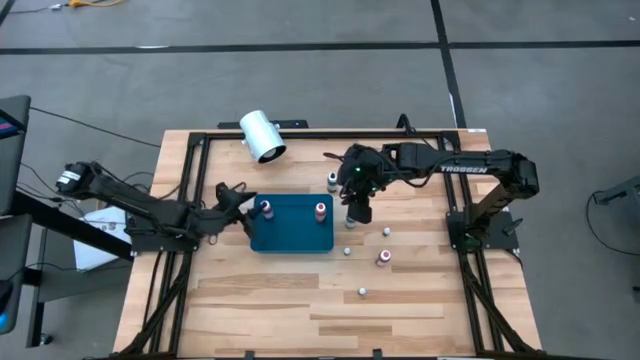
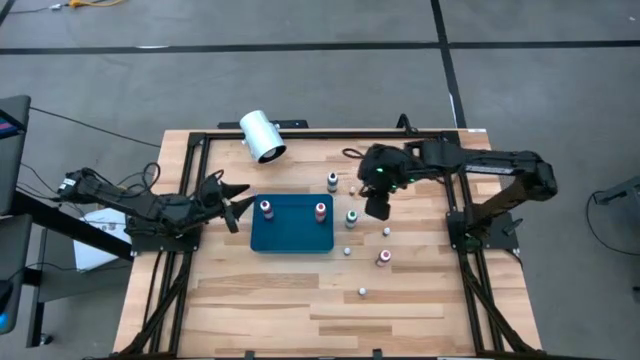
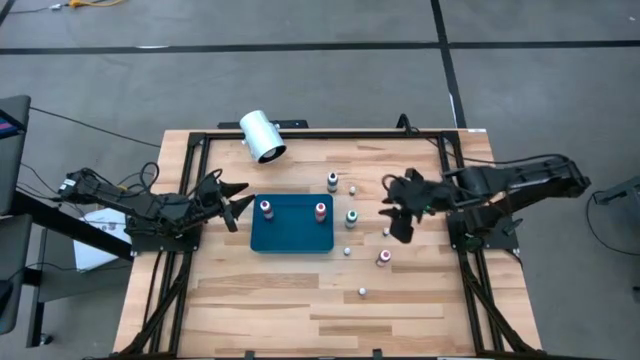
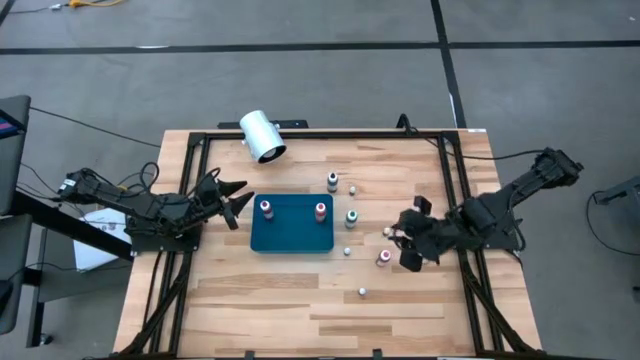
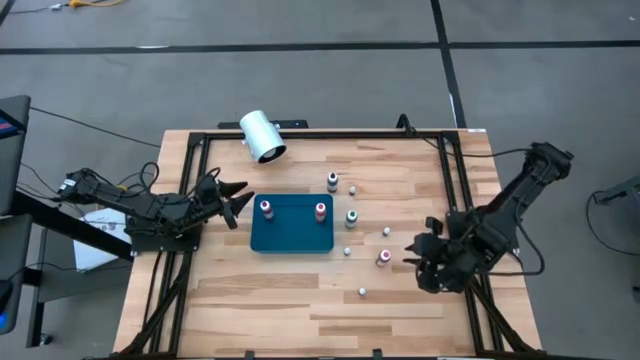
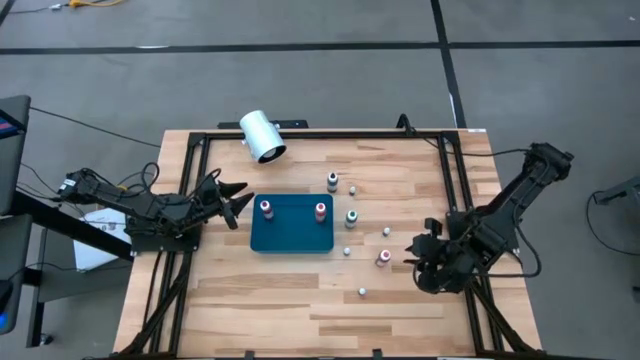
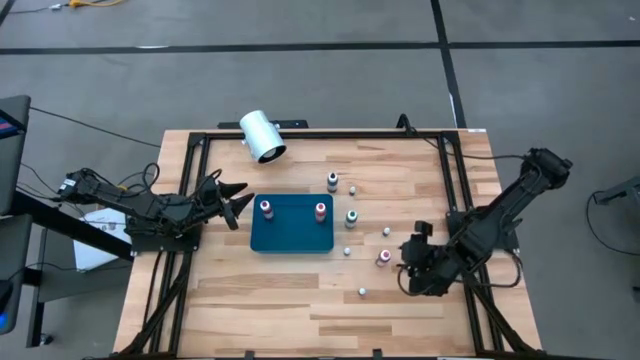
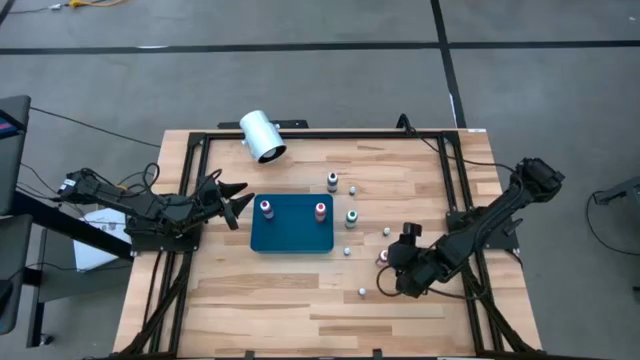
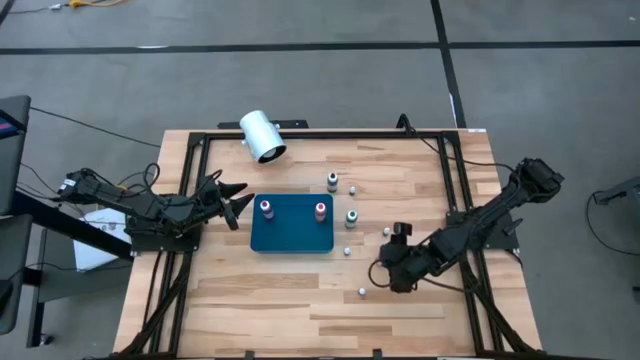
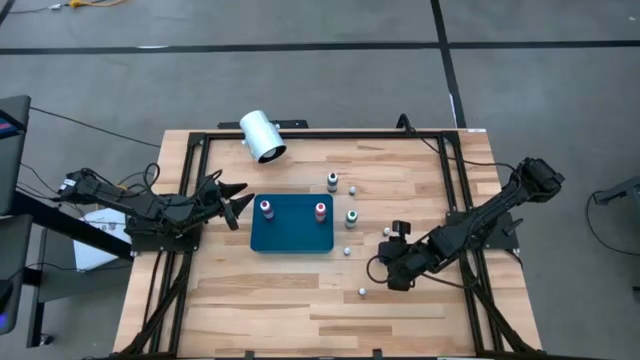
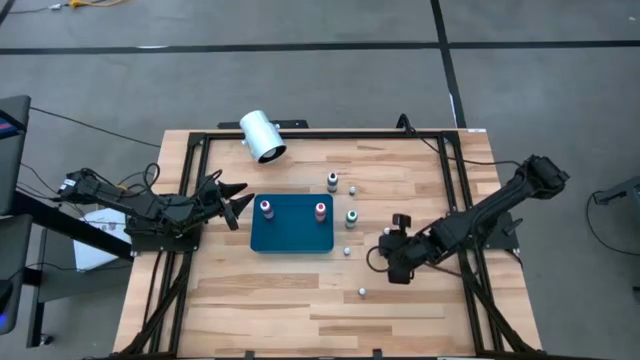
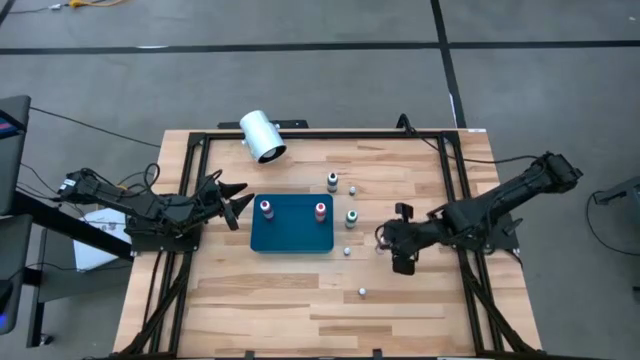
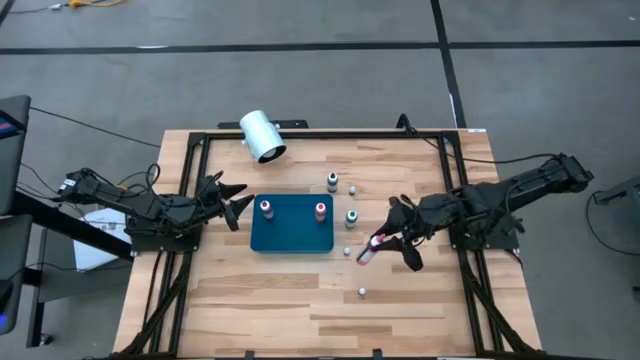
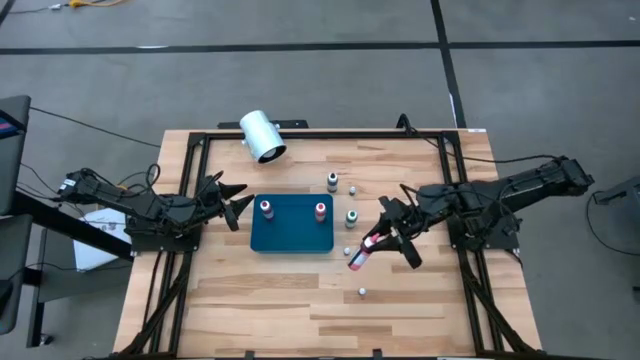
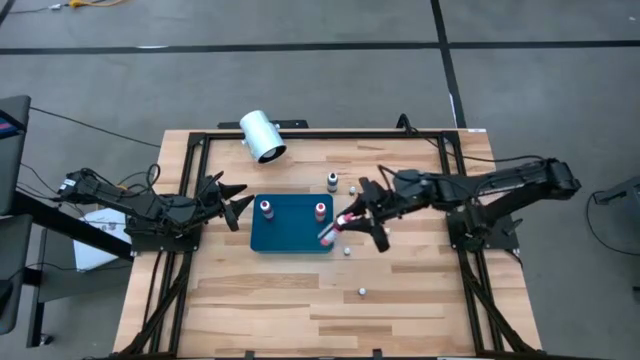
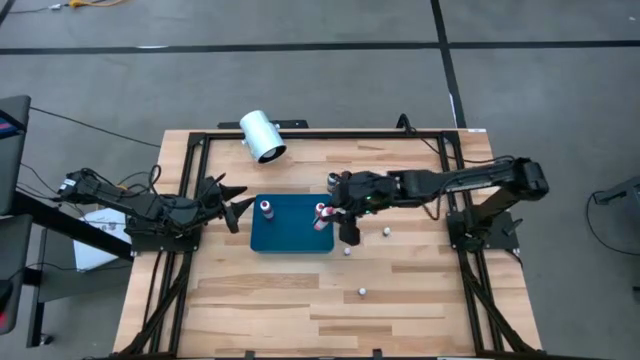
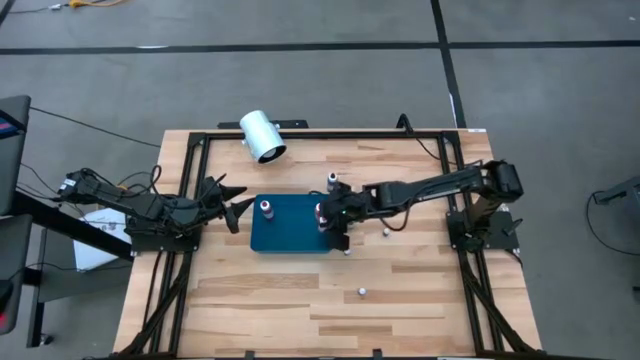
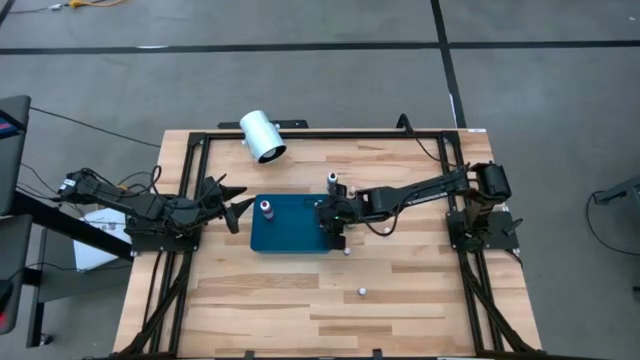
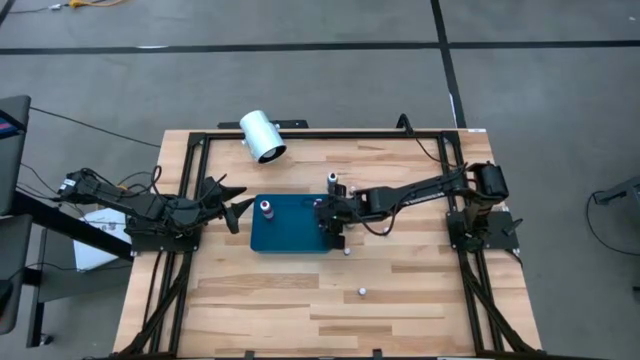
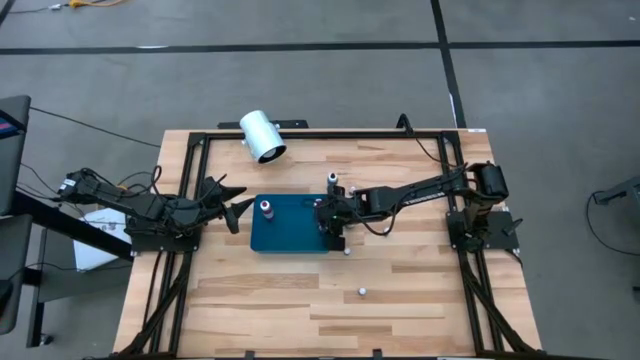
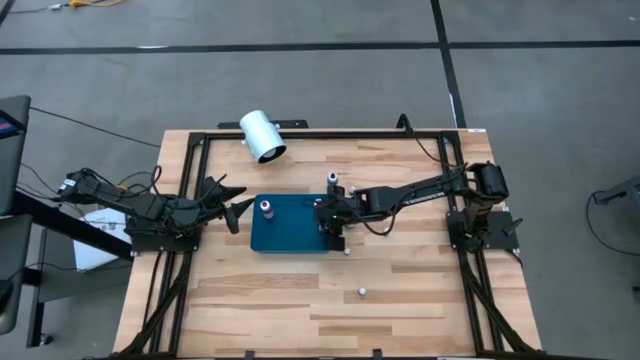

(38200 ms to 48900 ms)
Task: Pick & Place food coloring
Put the large pink food coloring bottle into the bin
